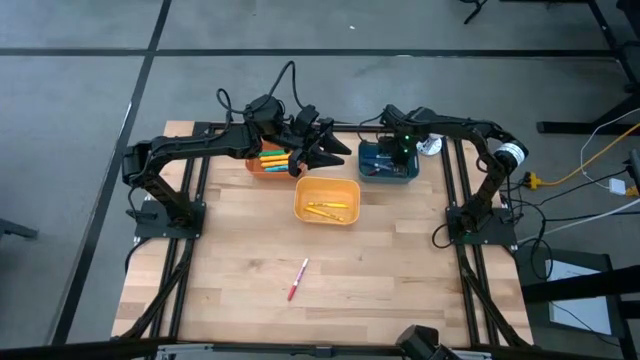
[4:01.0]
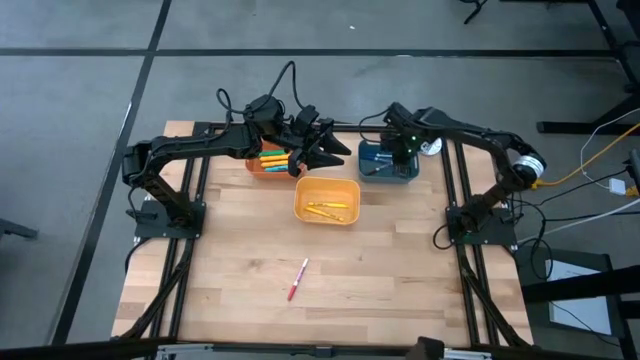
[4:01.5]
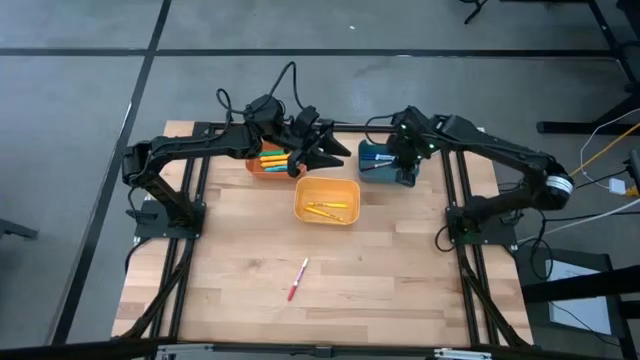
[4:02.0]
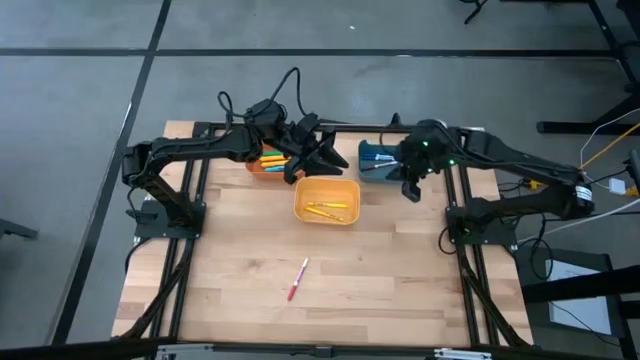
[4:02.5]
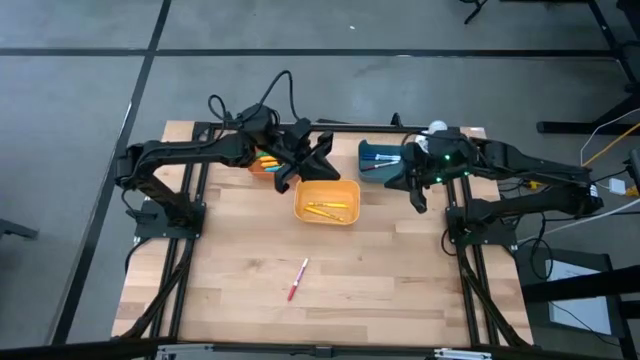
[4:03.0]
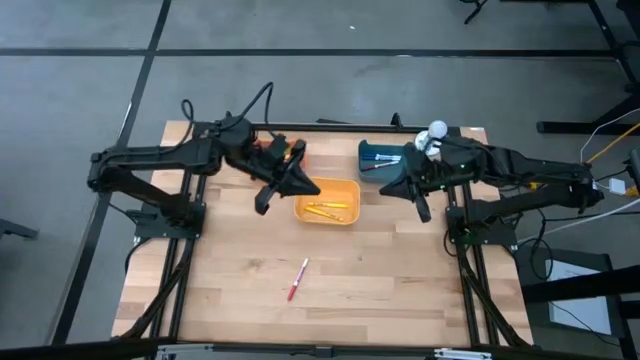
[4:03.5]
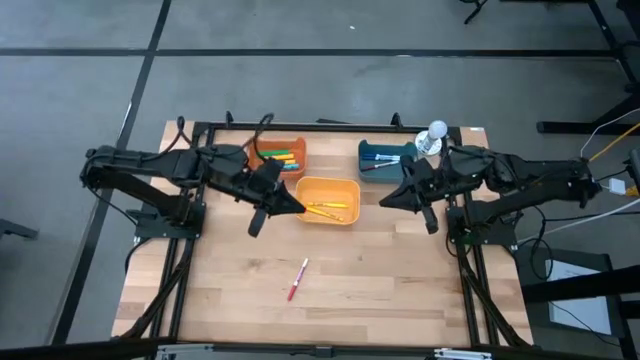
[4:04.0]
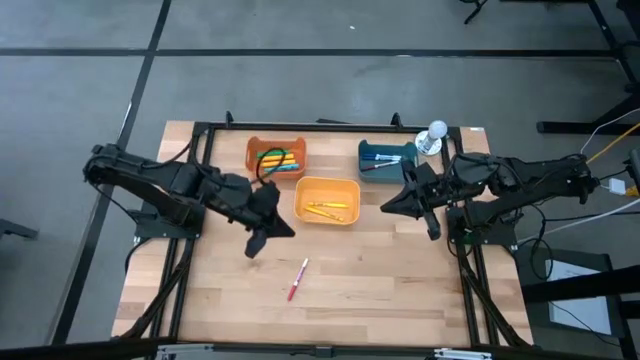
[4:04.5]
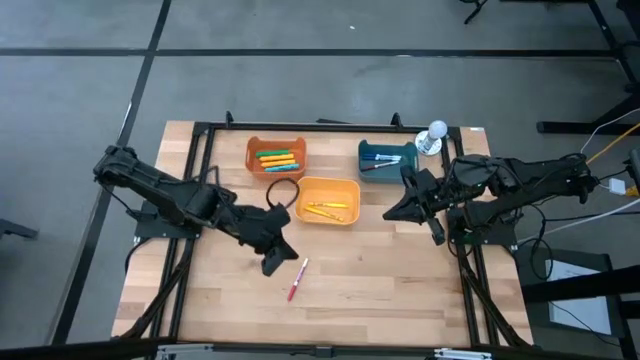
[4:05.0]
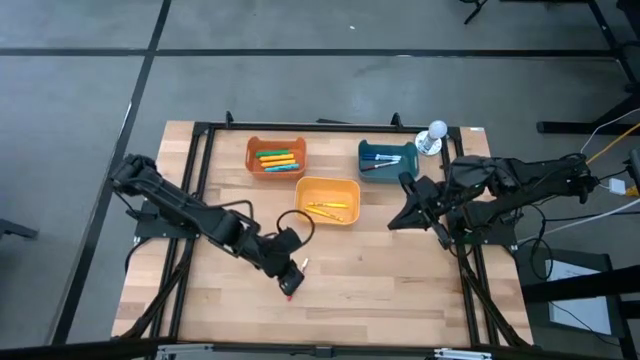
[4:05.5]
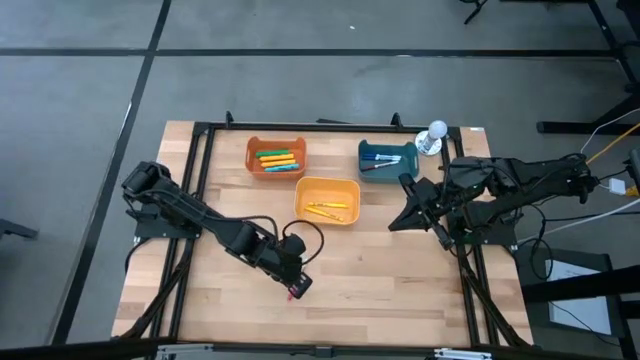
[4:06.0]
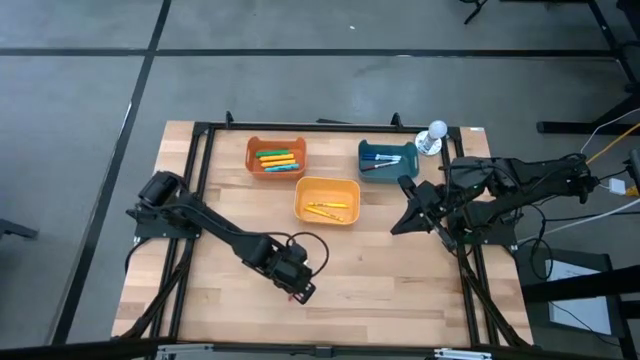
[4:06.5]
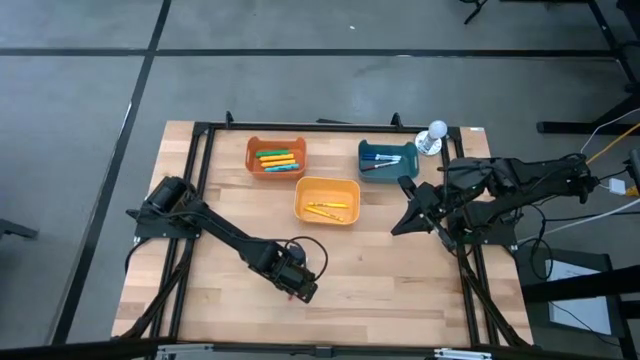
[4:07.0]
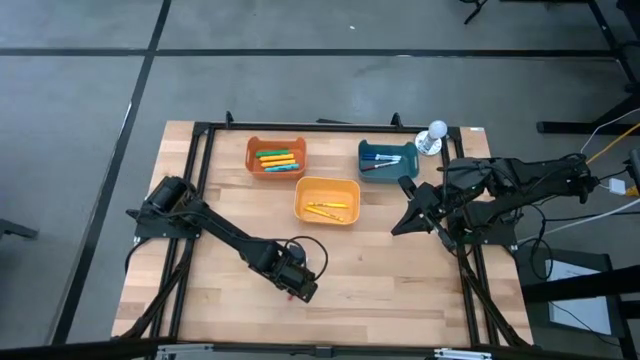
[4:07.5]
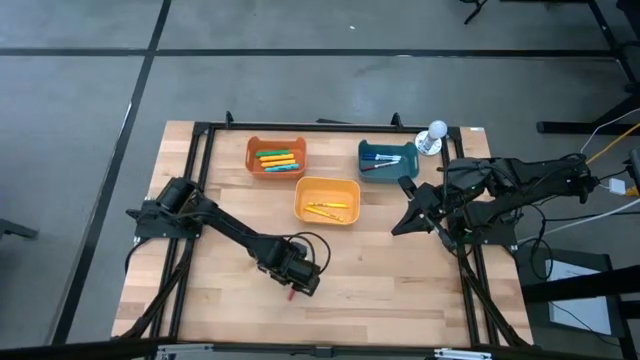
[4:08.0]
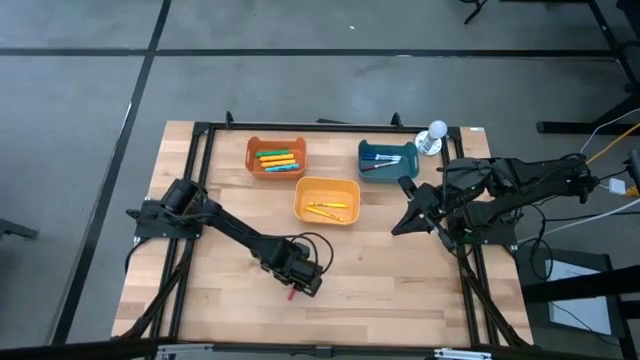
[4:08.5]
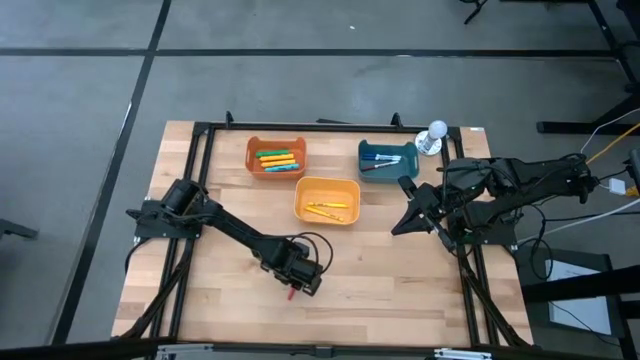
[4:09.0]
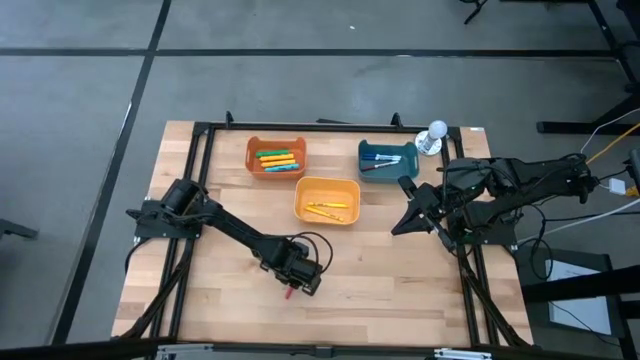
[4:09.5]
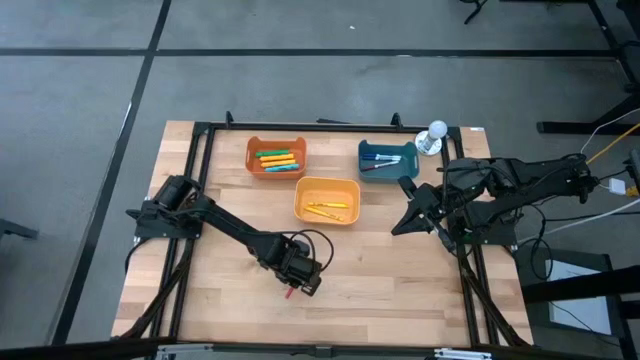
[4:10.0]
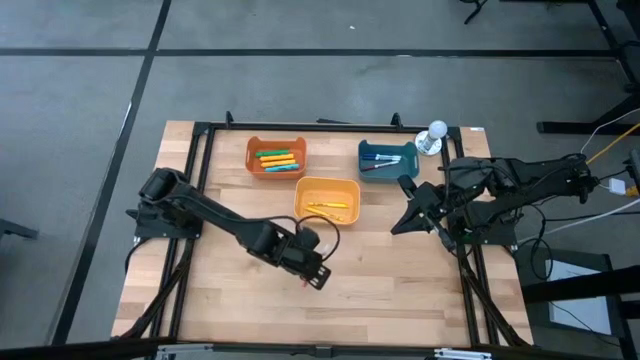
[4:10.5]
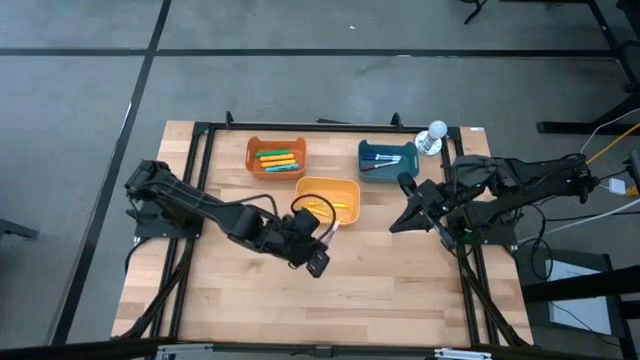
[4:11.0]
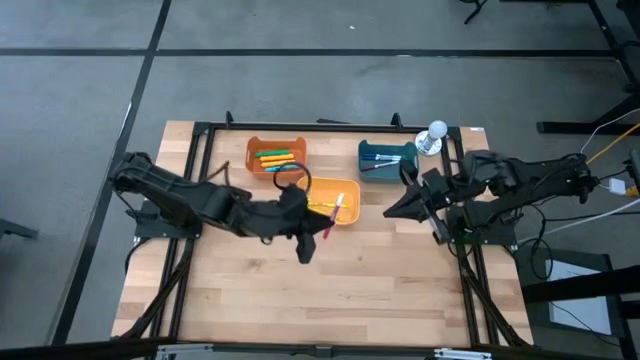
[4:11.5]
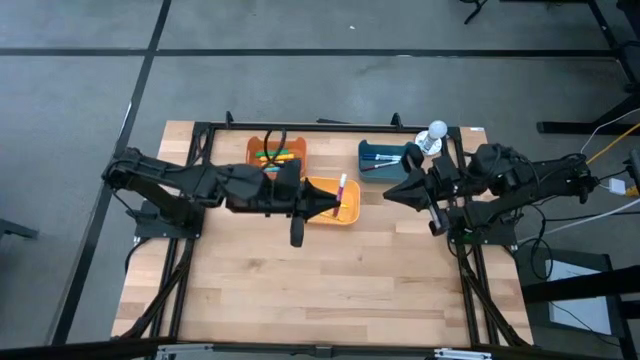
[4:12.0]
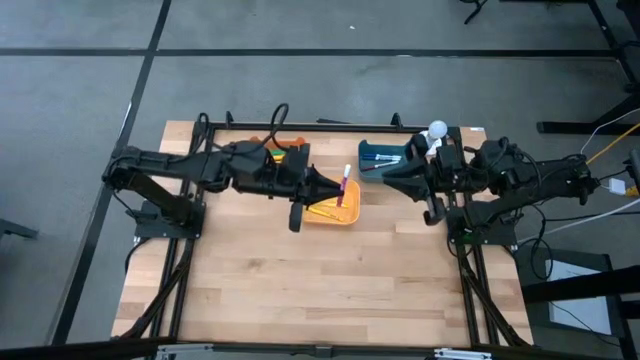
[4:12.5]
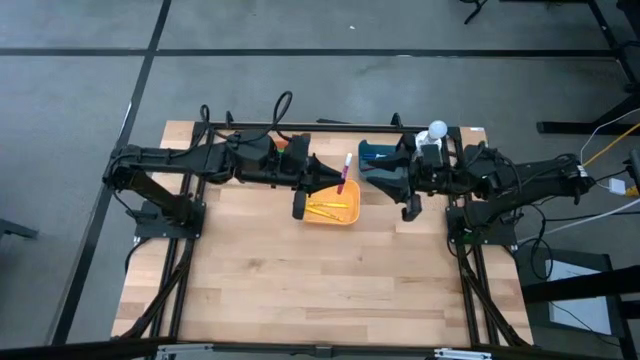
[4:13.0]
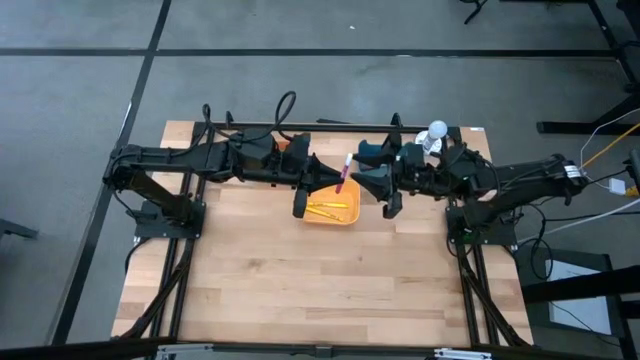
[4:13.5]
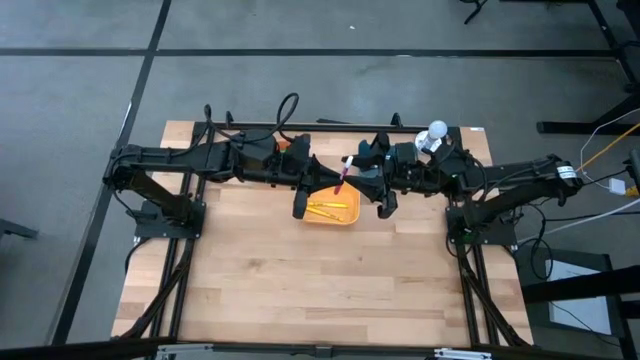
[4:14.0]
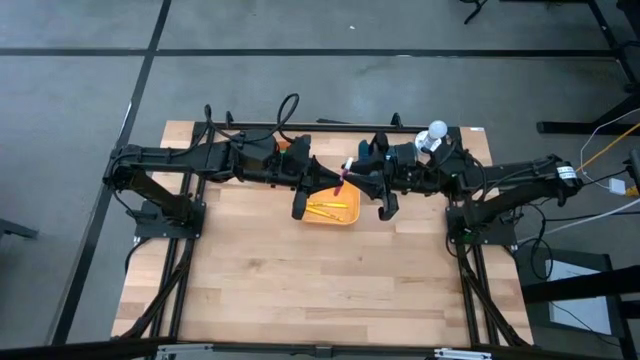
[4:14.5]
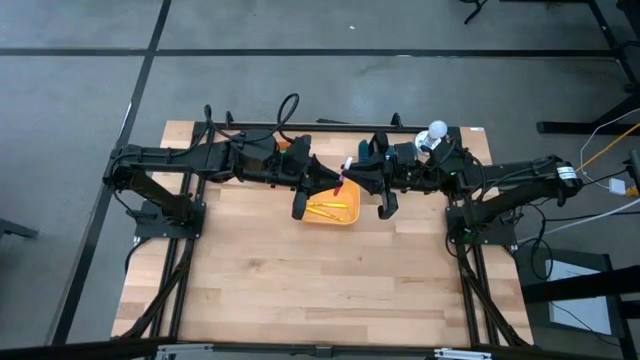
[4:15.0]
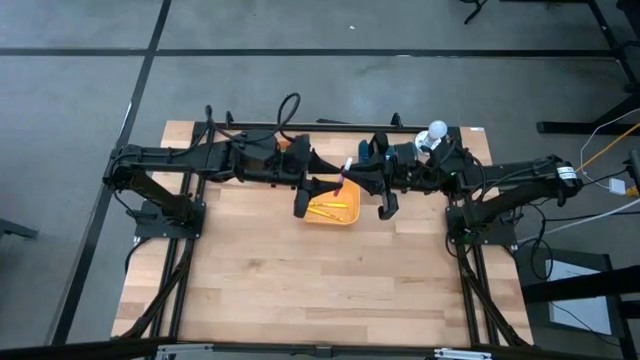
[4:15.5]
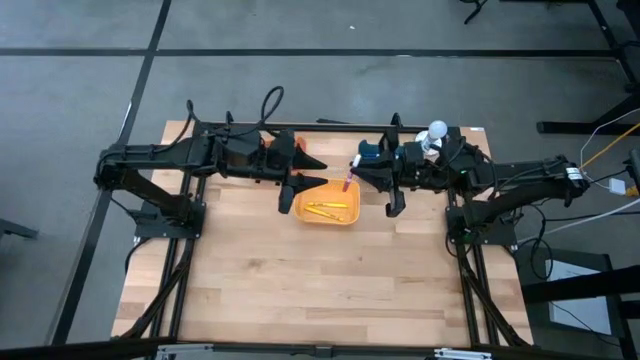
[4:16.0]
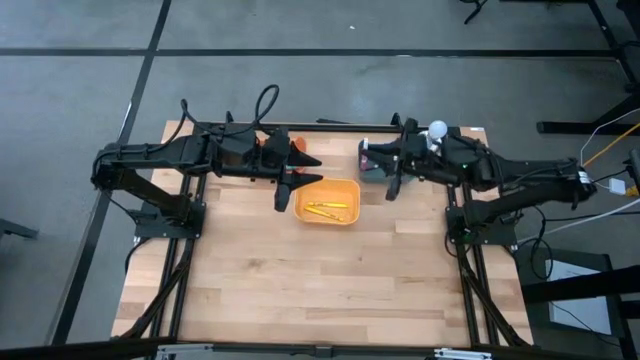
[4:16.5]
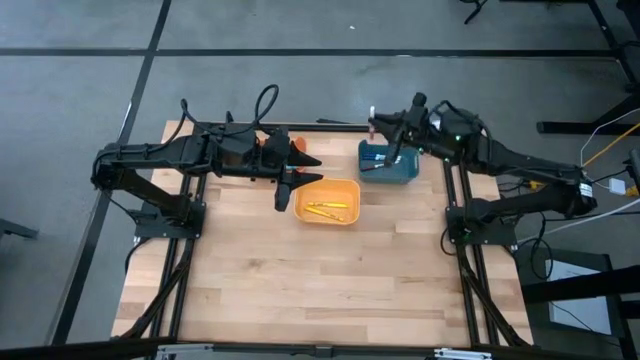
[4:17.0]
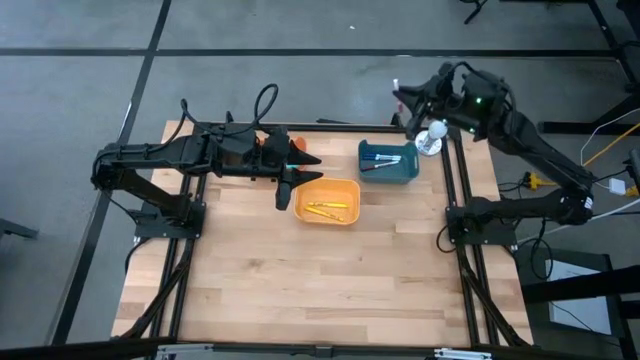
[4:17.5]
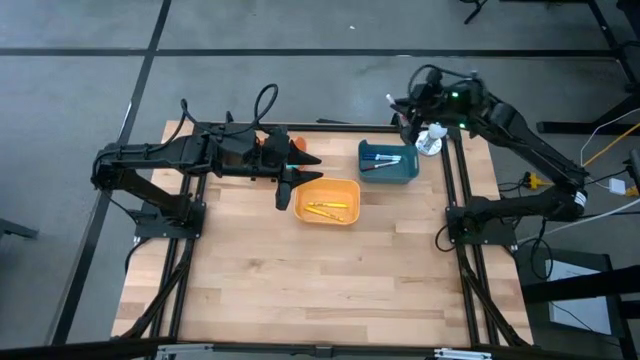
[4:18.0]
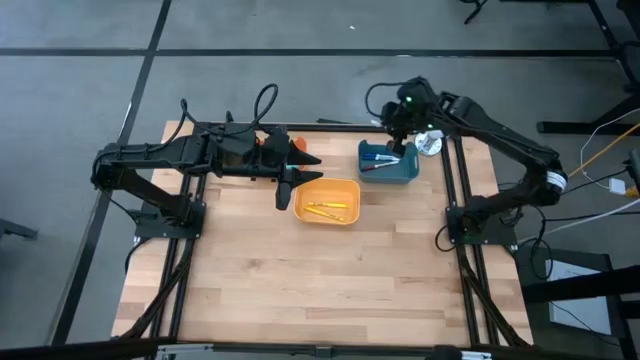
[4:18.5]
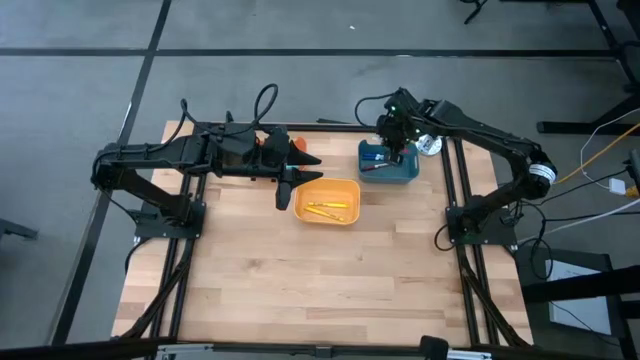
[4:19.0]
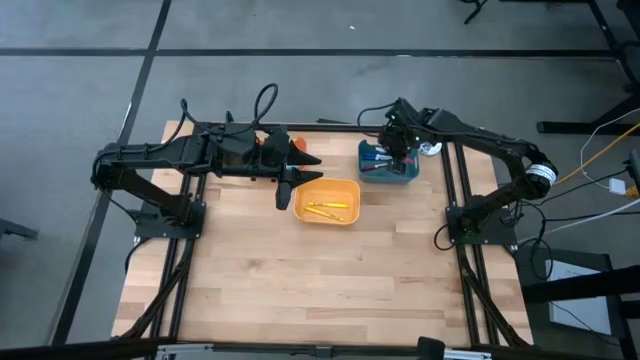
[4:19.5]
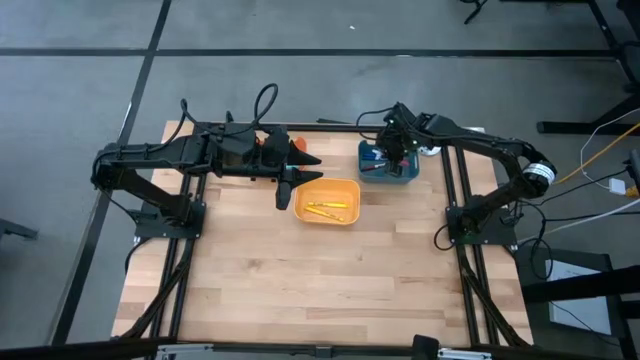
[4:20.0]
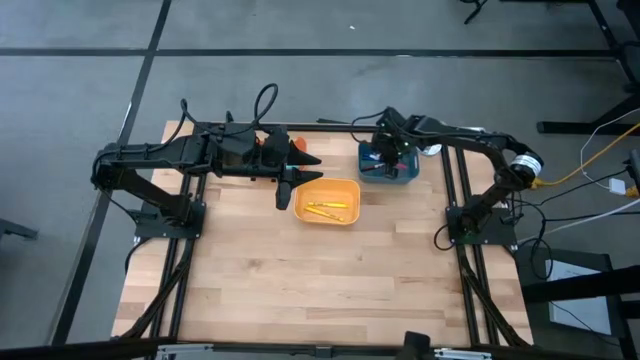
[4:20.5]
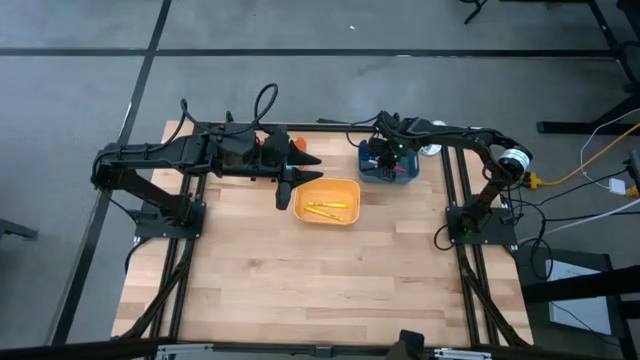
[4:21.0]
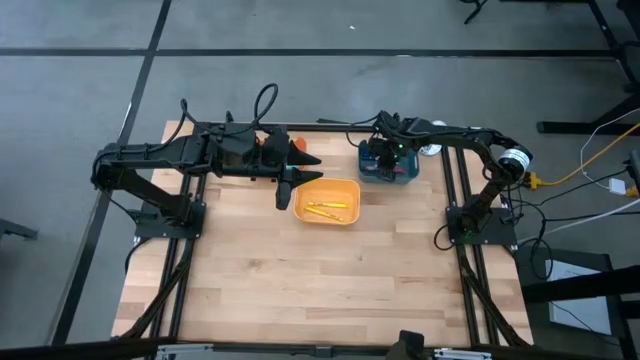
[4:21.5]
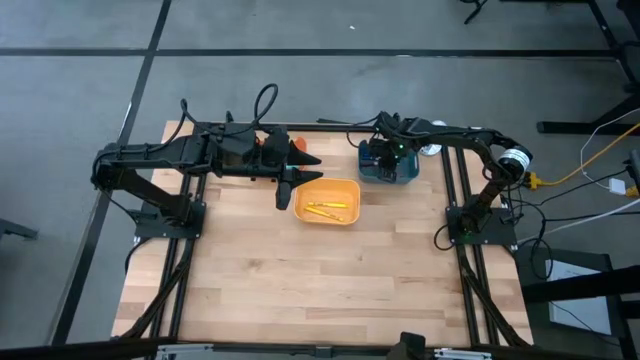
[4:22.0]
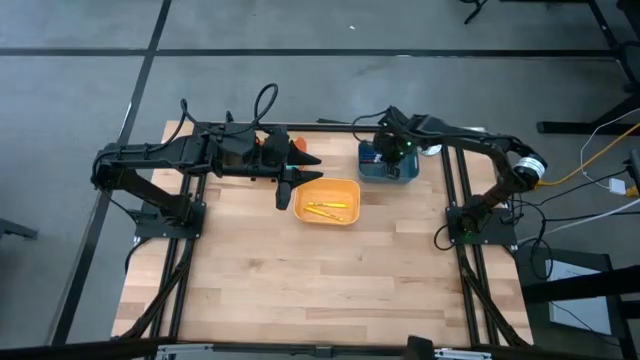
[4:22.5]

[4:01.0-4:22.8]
Task: Pick & Place Markers
Put the pink marker pen into the blue bin

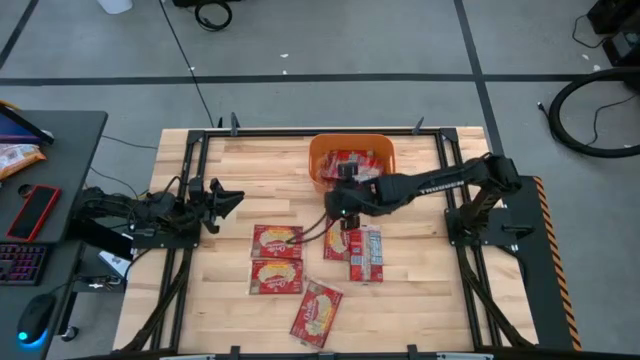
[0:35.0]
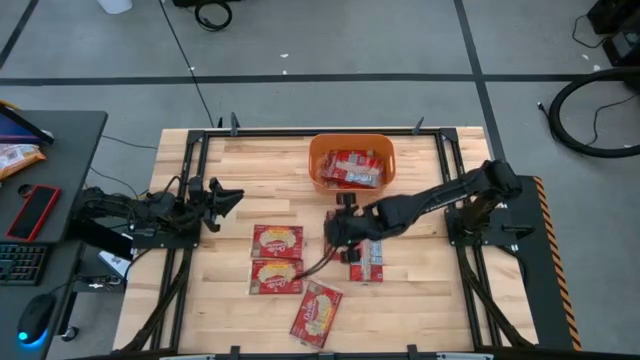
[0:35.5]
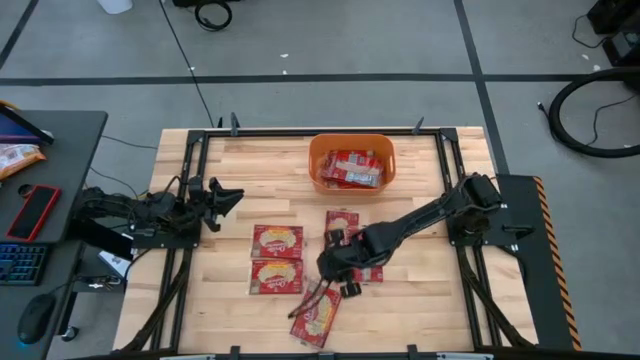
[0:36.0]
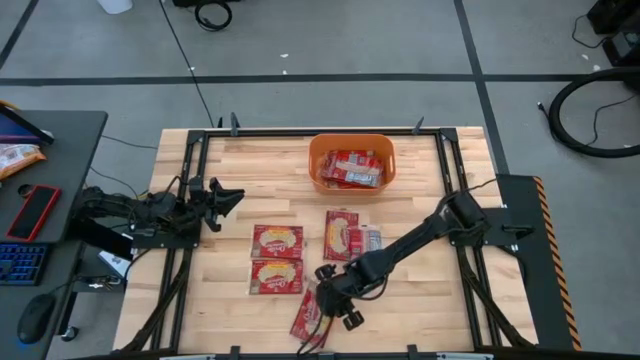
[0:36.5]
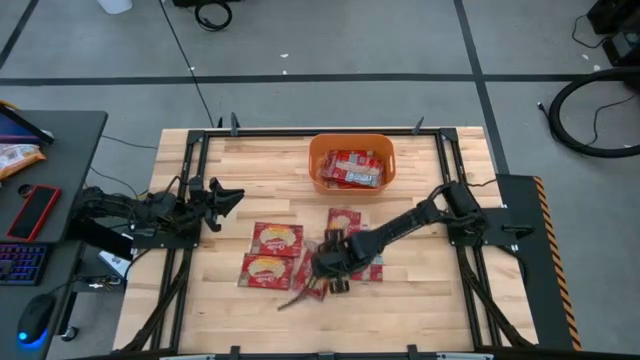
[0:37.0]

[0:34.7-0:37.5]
Task: Sort popcorn bags into baskets
Move the bottom popcorn pack to the center of the table
